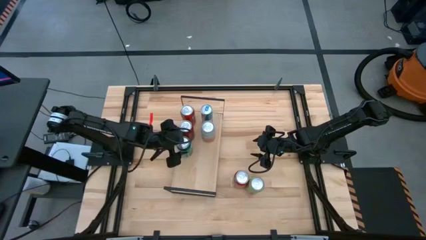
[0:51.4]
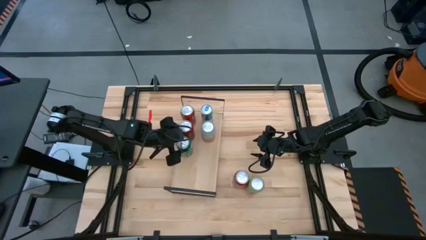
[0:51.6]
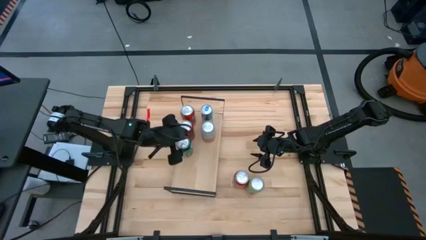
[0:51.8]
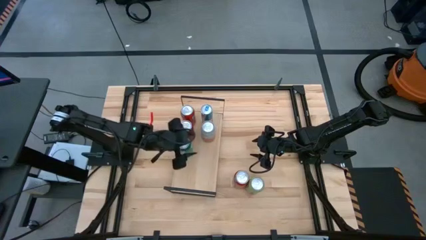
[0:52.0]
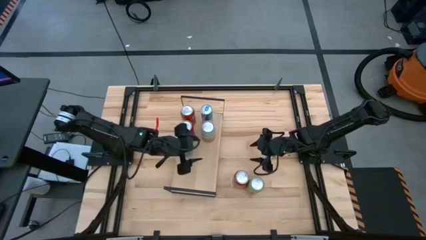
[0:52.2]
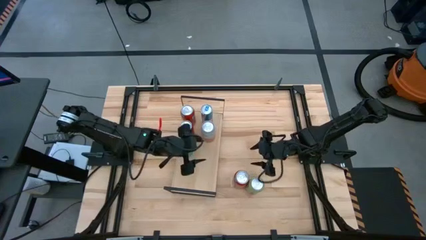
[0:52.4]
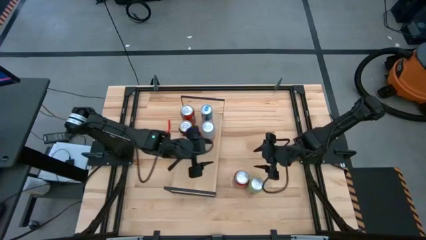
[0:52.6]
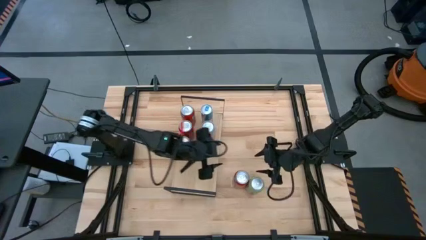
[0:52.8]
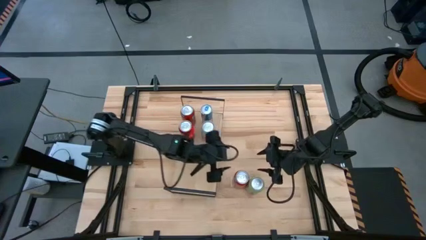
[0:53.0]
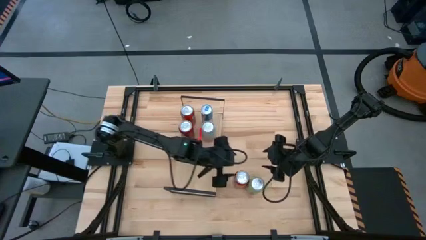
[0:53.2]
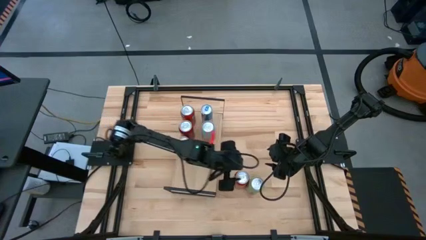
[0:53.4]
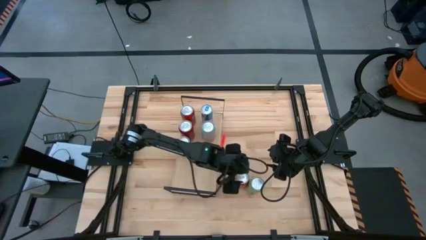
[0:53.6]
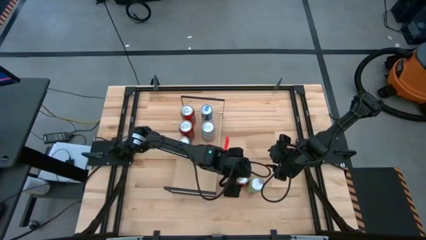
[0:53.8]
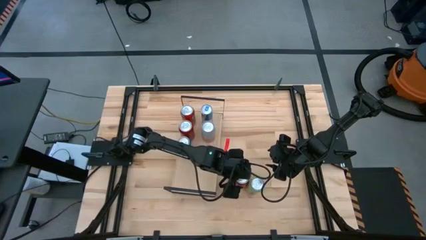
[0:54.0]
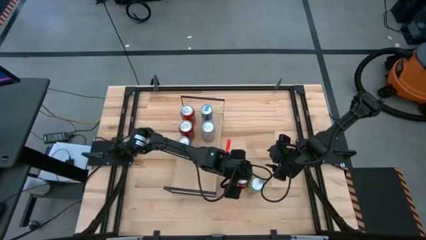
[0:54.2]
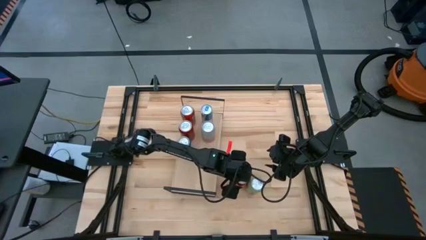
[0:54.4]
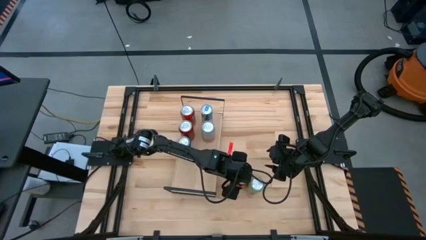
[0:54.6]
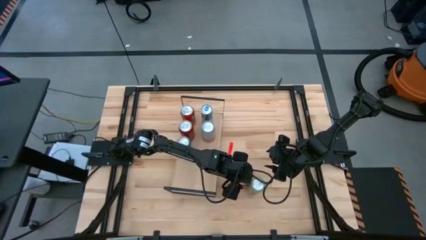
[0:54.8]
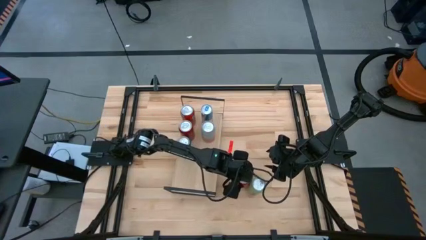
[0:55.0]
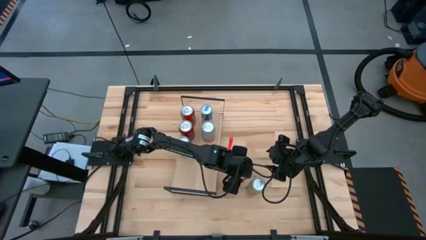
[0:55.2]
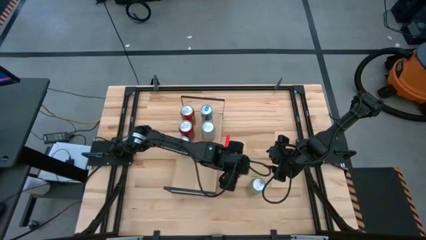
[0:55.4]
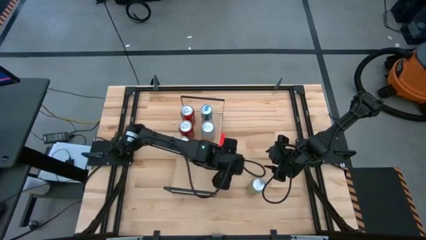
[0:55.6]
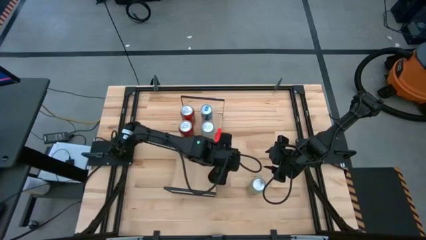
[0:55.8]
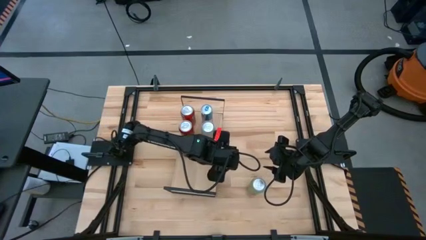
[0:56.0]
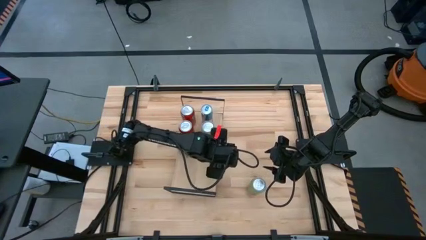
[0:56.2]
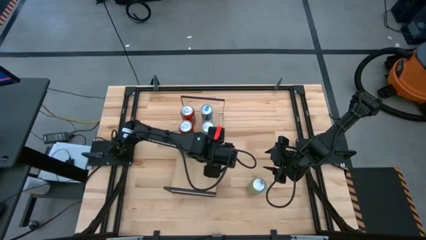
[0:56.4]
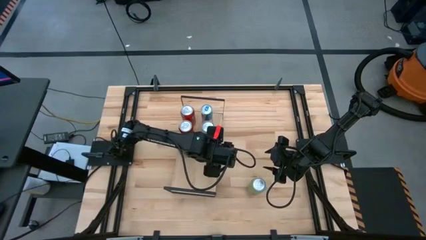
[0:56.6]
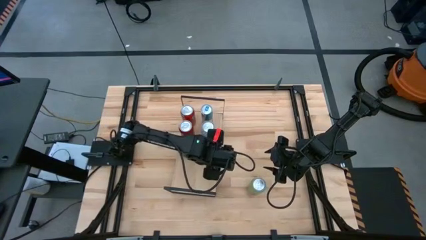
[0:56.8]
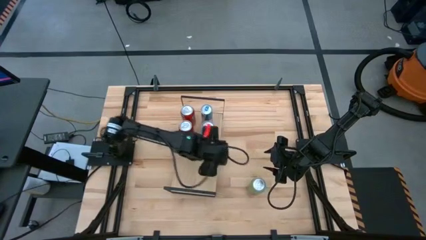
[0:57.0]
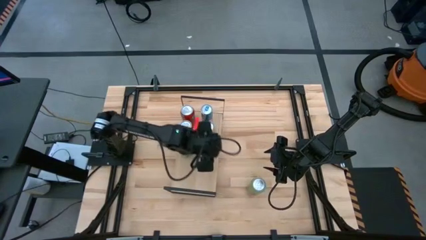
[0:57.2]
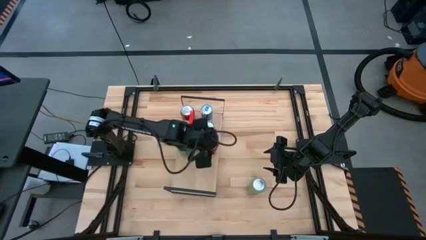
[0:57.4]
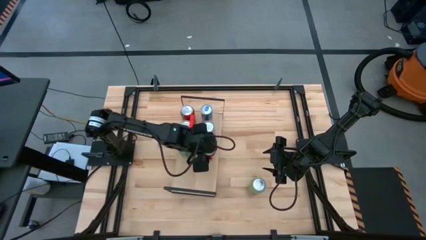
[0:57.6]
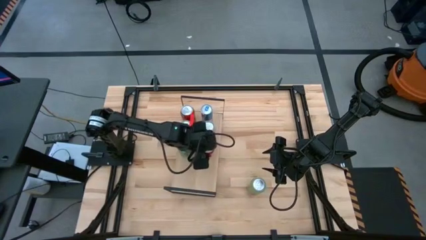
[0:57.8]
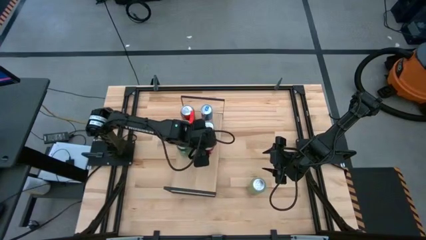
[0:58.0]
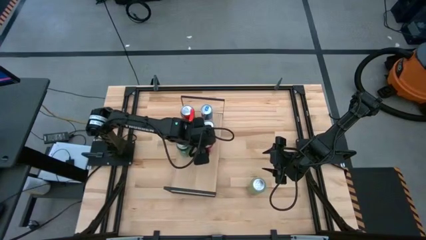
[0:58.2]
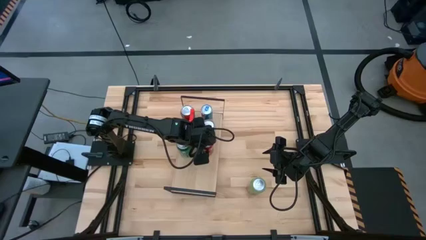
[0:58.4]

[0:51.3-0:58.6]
Task: Place canned beverage on shelf
Put the red soda can can on the shelf

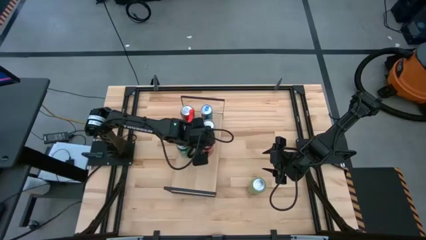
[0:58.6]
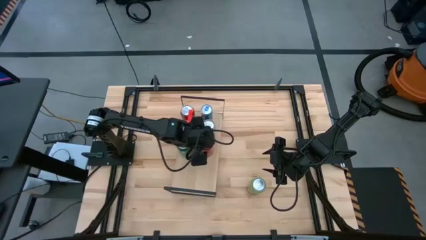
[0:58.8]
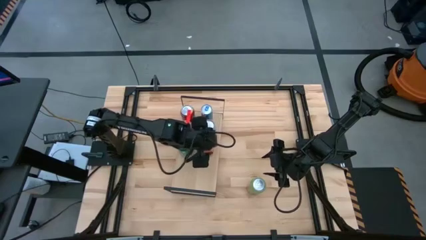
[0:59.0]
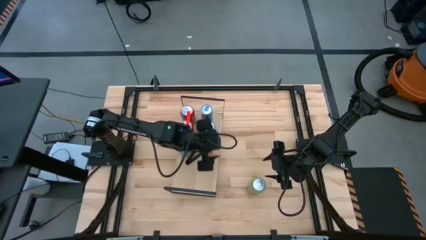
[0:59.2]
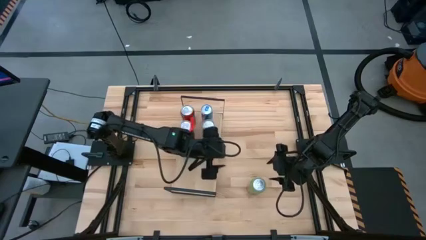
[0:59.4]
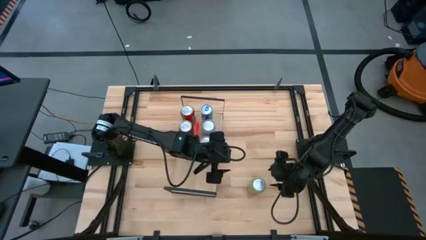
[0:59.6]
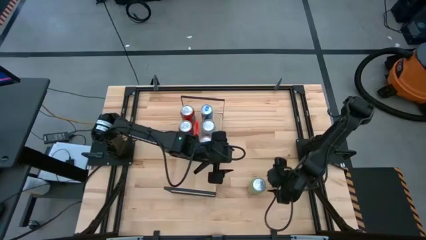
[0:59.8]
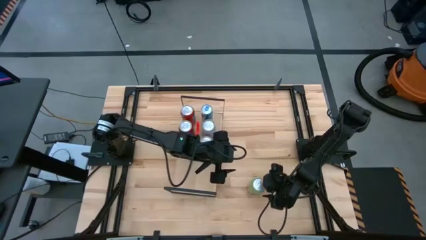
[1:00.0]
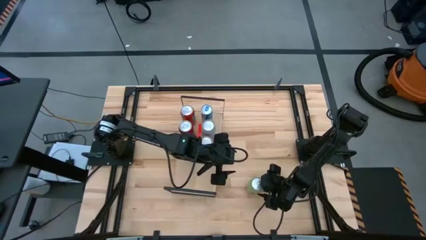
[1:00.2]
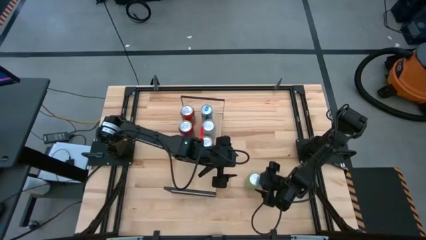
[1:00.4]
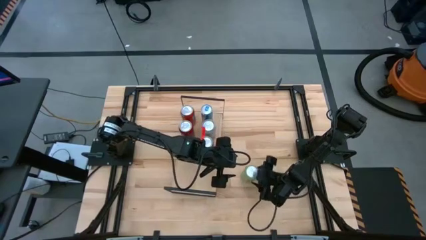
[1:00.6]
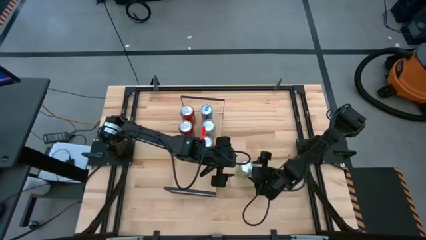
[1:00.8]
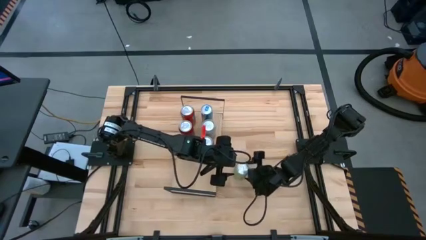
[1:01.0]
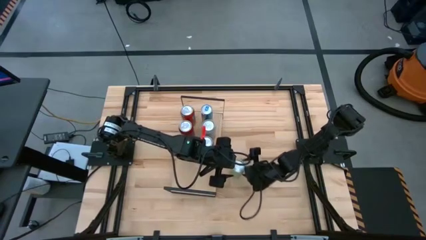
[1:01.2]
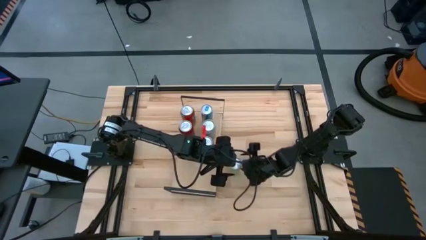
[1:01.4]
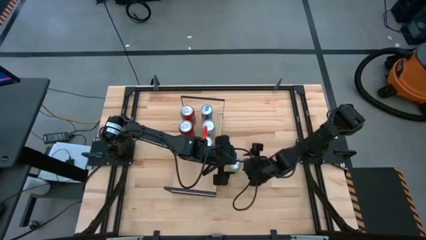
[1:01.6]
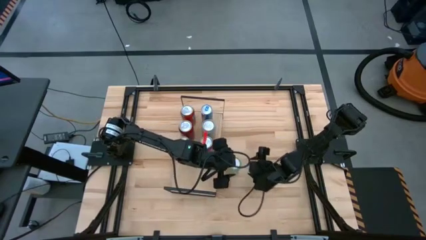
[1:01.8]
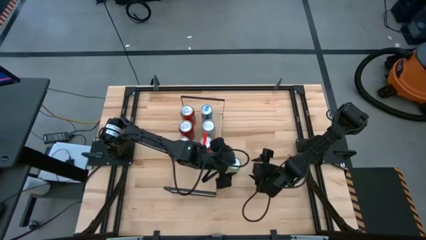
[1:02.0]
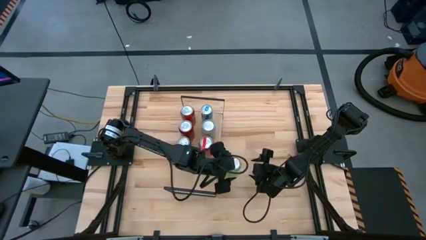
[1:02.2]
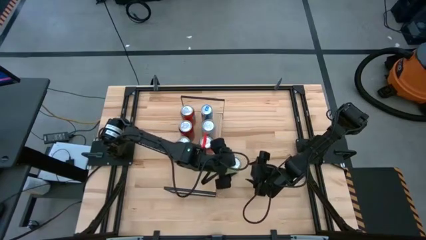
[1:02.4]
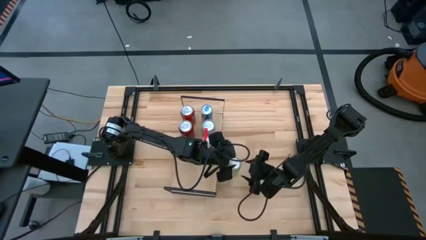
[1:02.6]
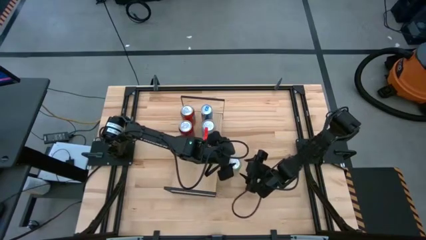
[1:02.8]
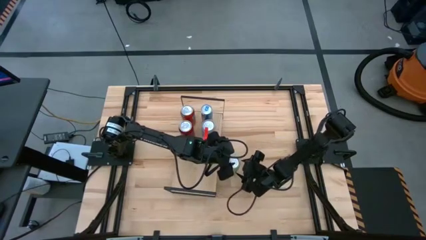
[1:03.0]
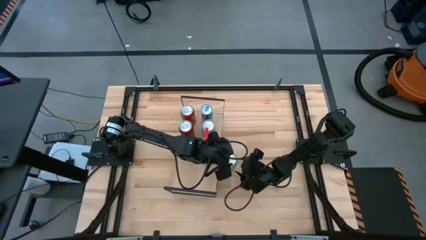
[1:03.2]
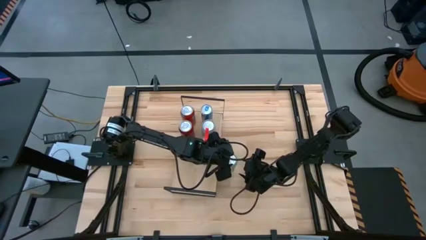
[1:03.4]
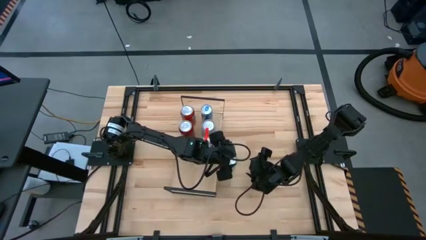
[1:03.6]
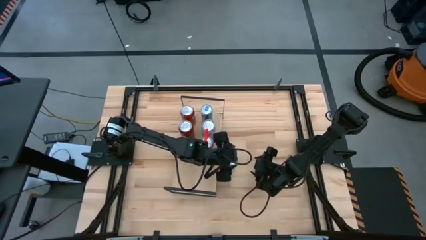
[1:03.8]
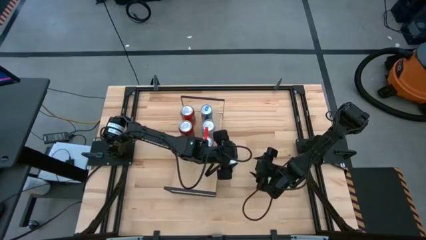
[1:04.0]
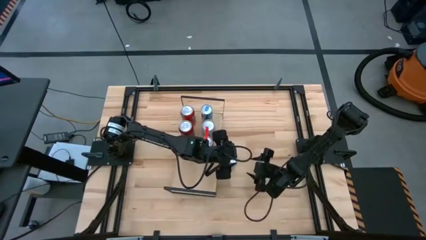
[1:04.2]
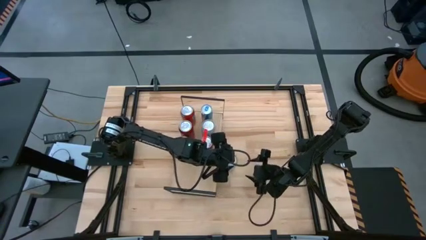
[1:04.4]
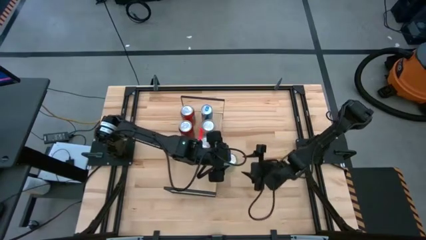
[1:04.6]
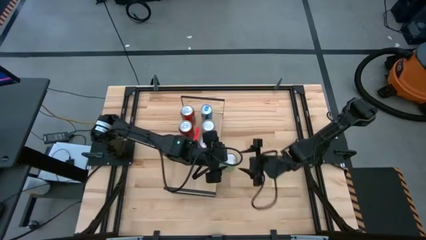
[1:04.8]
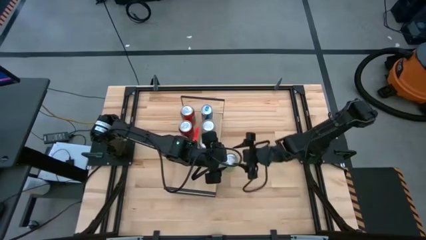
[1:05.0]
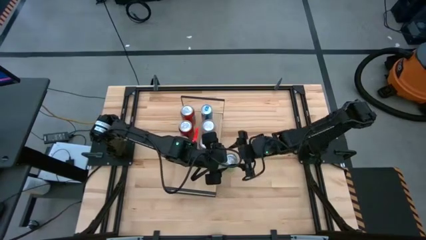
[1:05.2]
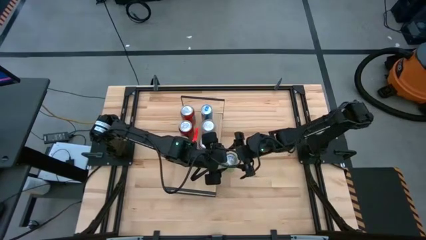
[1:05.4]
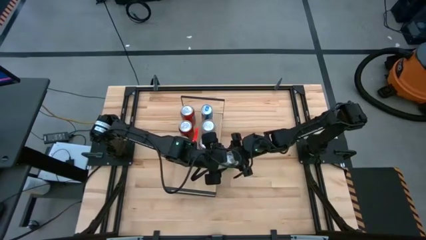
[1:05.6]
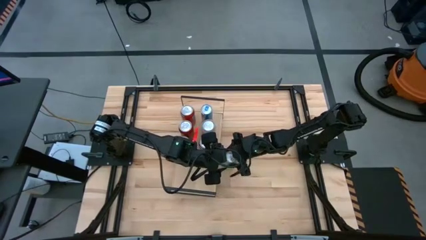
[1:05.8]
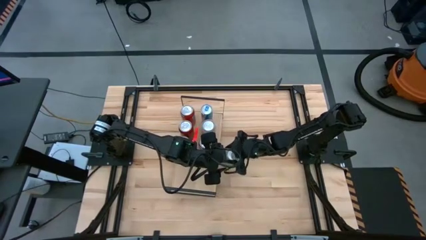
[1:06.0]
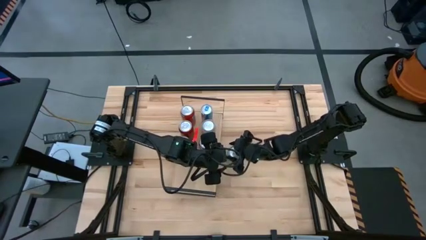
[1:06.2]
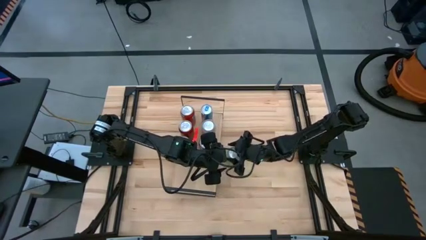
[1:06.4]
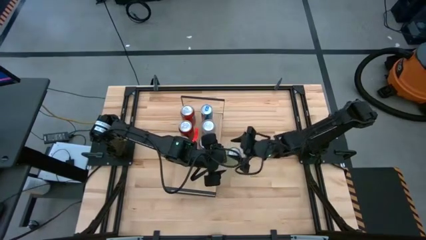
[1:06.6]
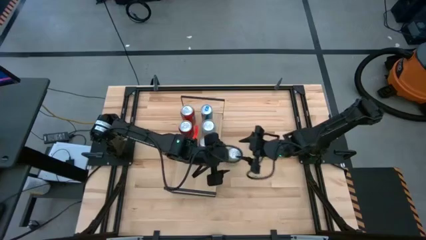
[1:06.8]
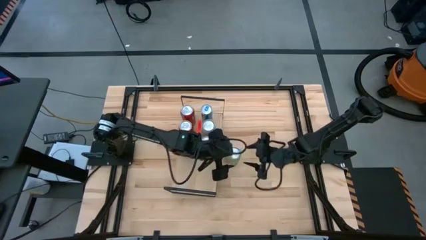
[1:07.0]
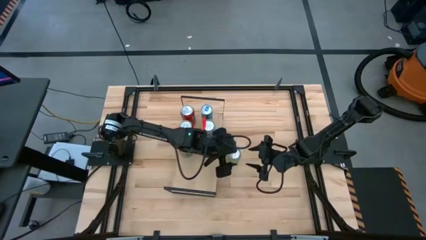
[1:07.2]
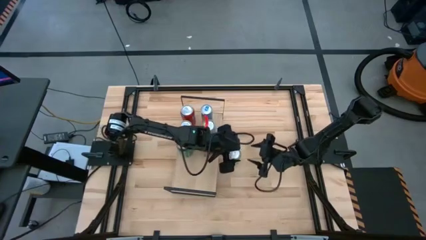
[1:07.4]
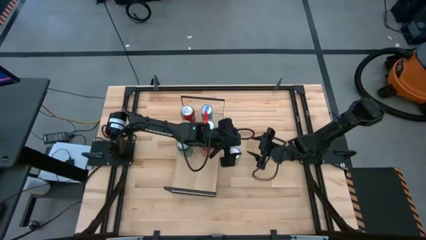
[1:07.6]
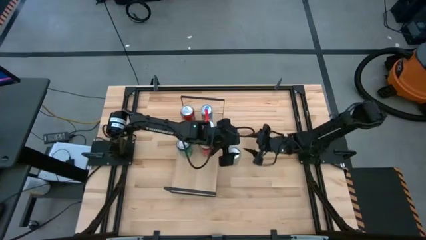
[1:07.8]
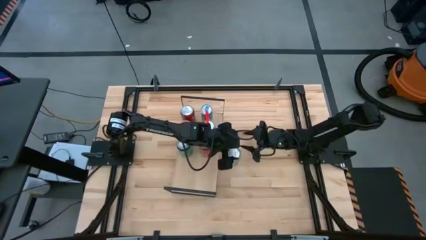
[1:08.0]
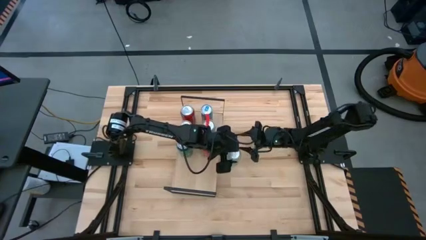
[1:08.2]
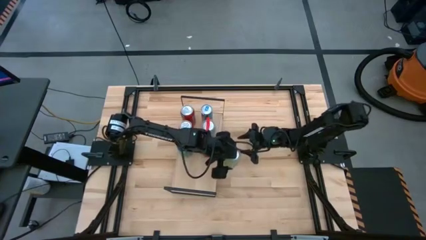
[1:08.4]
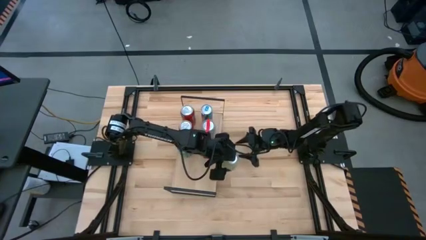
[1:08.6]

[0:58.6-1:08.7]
Put the light green soda can on the shelf
